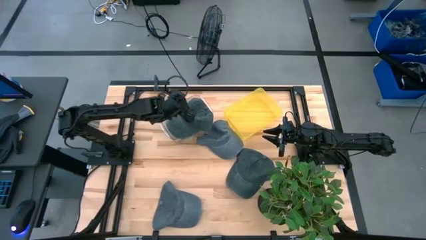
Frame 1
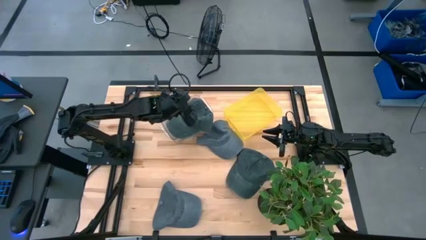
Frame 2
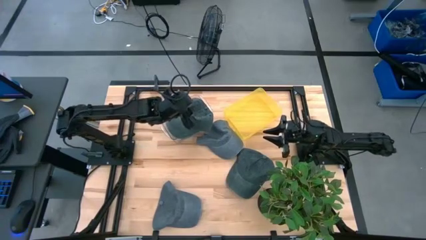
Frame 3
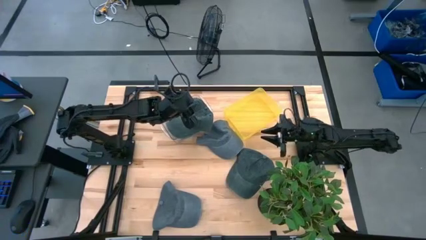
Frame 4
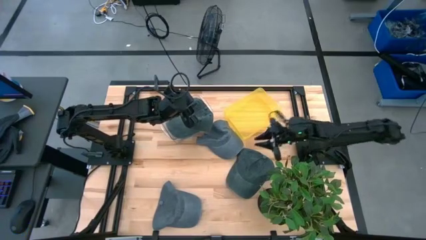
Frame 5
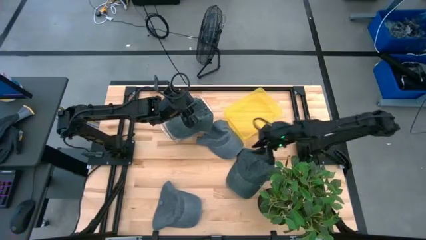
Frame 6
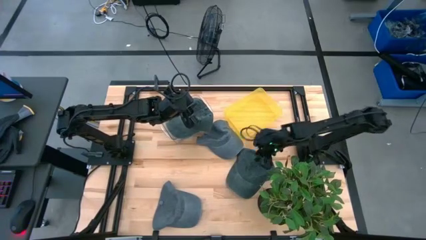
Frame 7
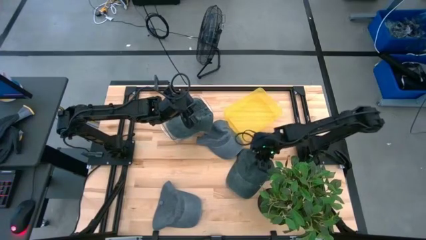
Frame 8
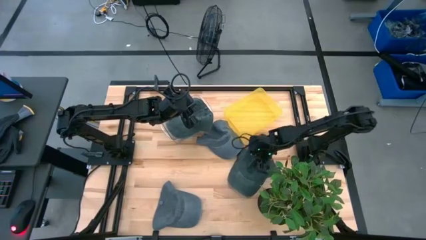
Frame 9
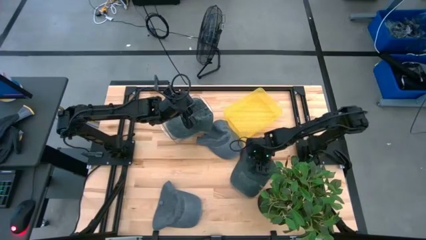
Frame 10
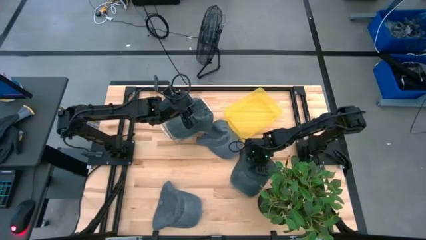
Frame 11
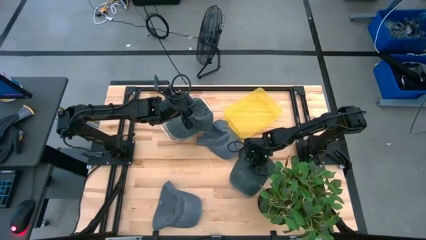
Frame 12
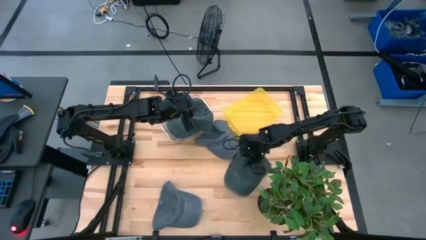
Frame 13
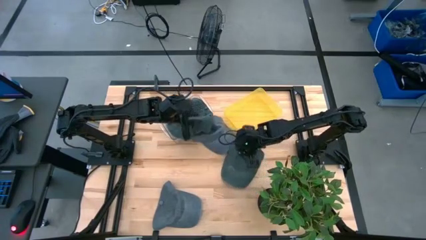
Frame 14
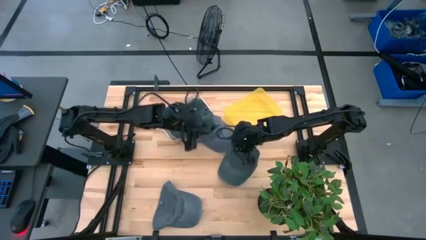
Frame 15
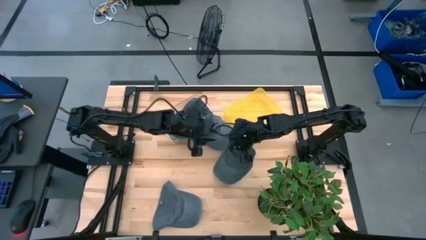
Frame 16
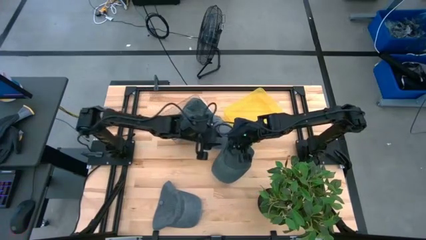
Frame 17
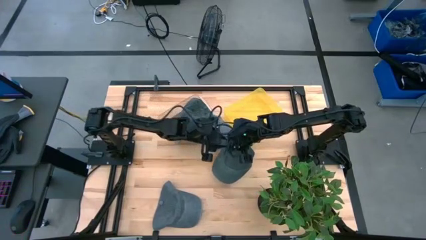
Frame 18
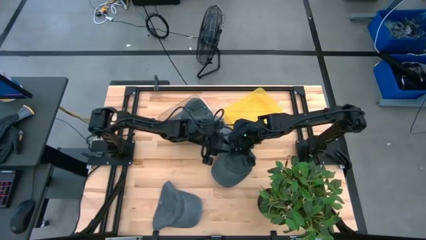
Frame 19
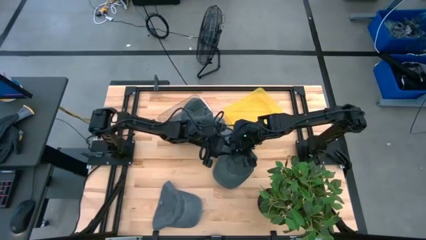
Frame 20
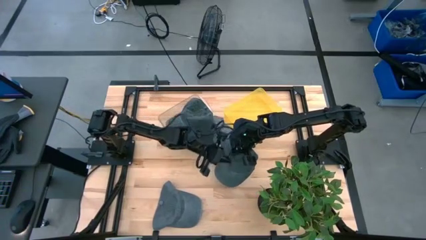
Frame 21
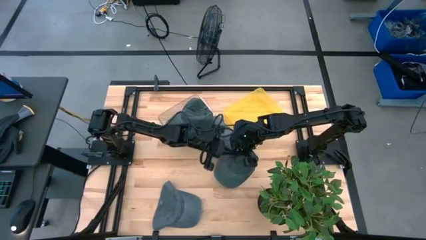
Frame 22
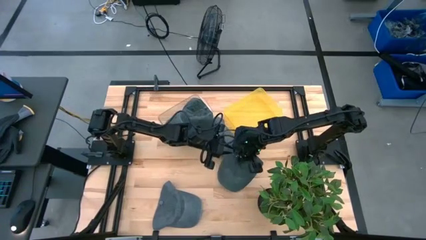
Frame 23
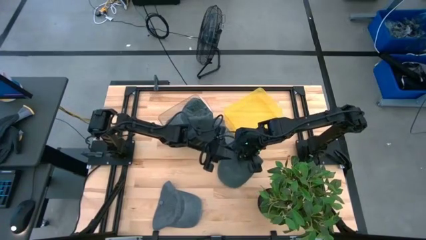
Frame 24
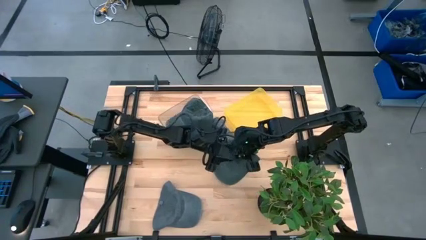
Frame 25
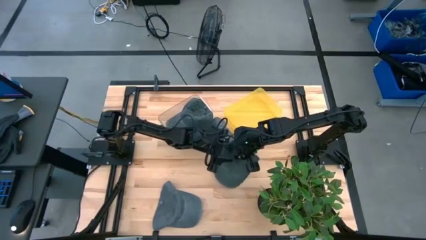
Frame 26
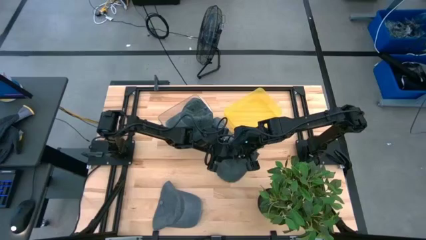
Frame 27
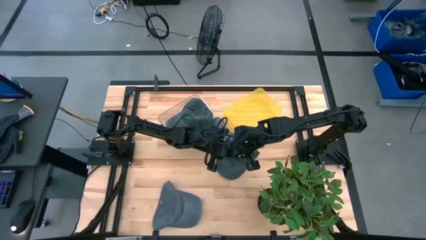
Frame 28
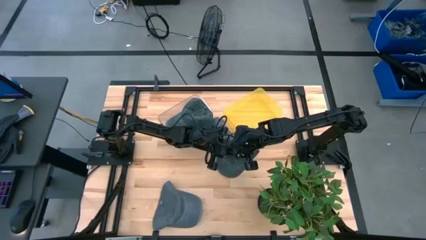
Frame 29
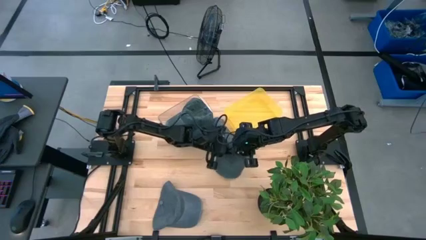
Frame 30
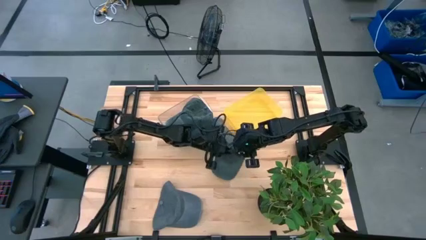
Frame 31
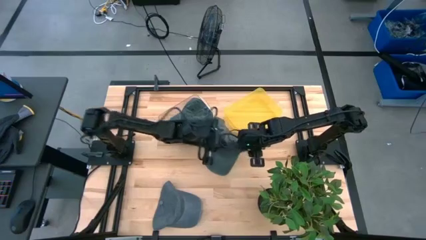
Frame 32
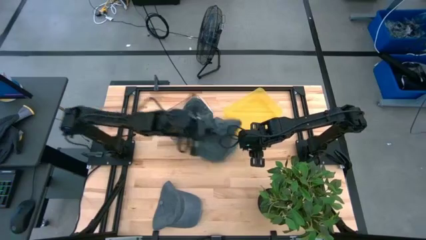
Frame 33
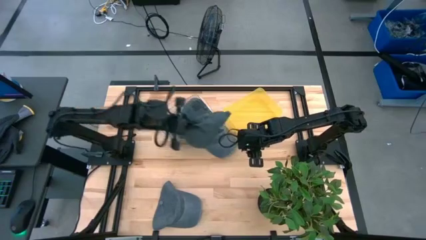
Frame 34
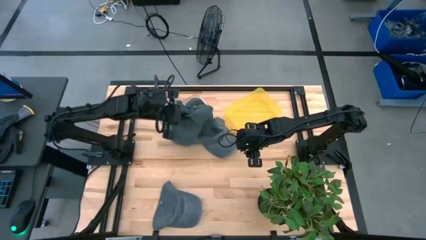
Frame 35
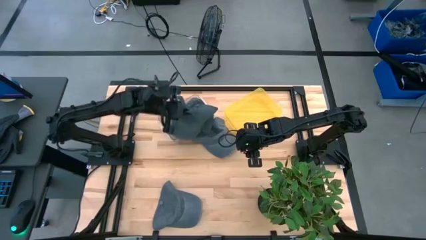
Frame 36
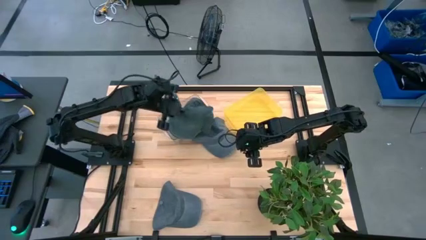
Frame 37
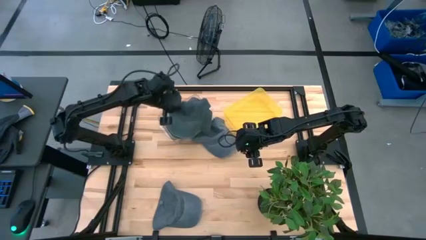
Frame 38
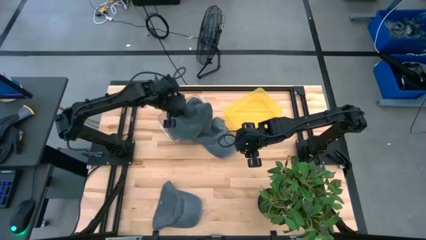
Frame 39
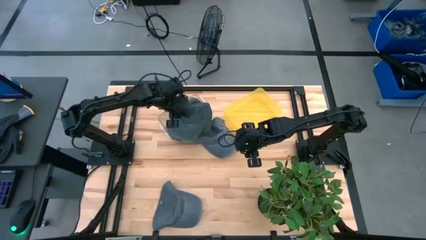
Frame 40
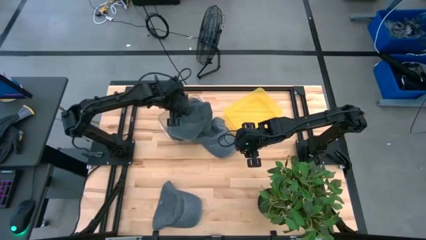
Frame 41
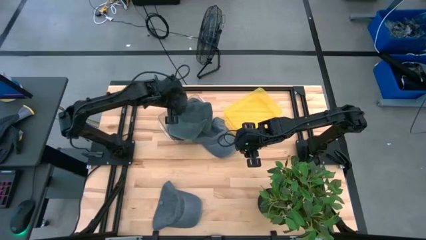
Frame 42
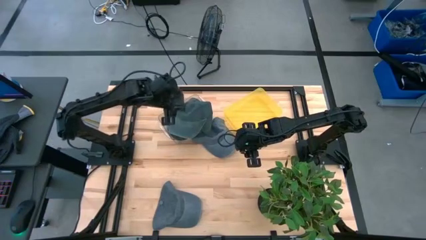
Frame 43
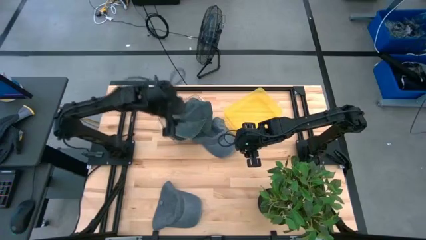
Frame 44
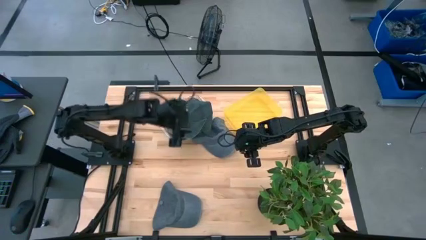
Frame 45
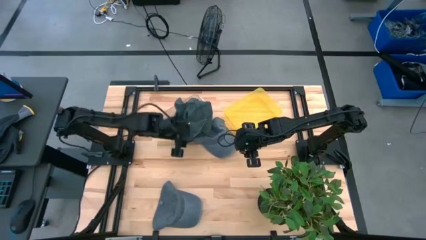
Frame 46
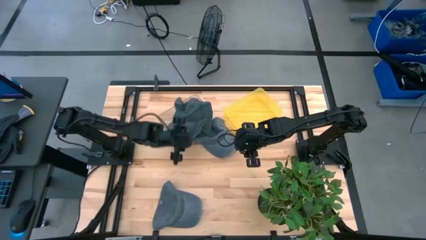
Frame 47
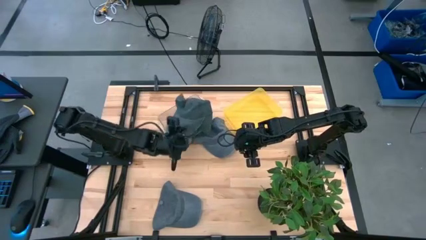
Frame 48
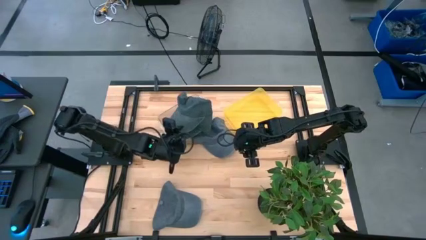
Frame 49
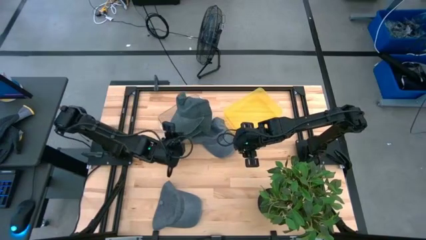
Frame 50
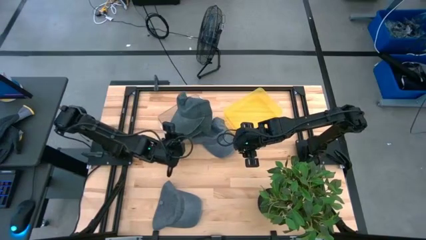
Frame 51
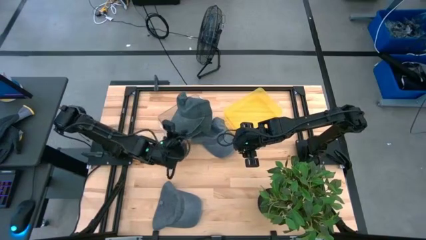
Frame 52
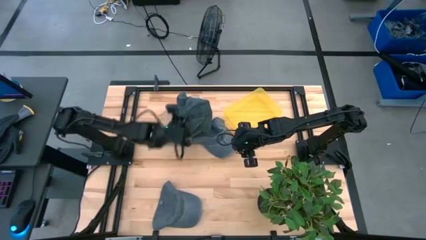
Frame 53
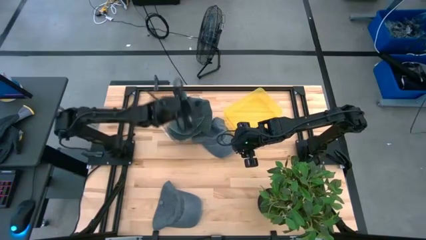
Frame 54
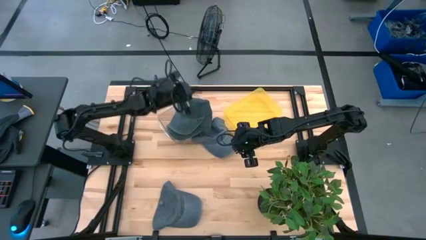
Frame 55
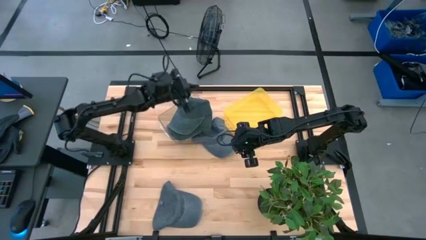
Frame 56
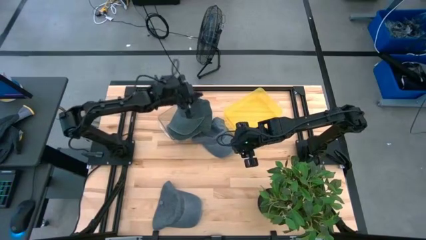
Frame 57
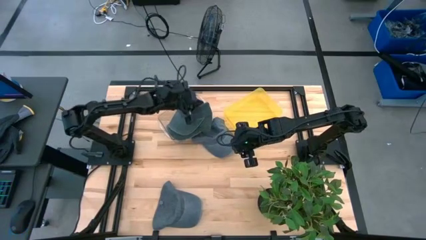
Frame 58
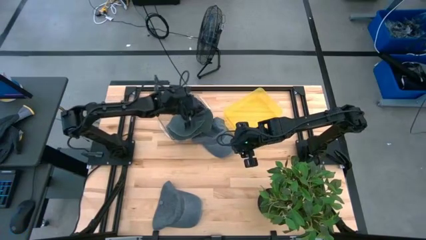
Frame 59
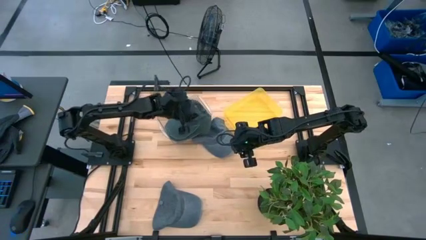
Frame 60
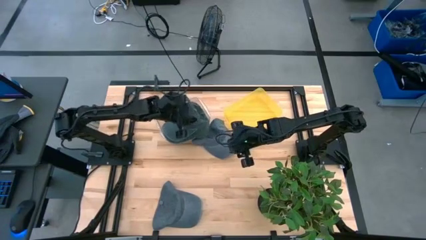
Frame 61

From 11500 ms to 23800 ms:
Task: Pick & Place hat
Put the black cap into the transparent bin
